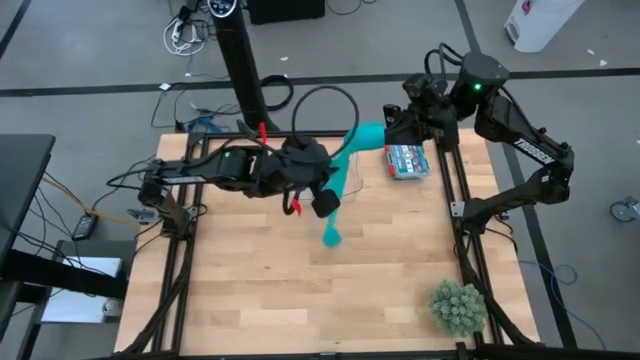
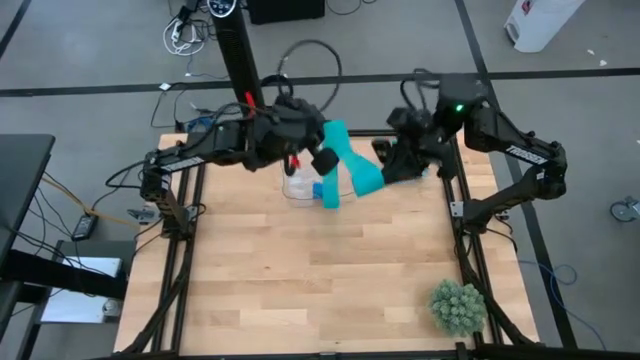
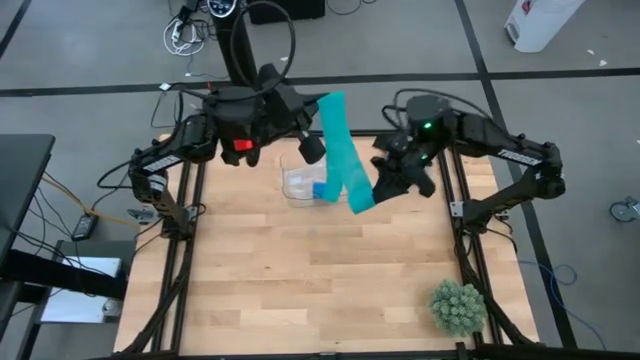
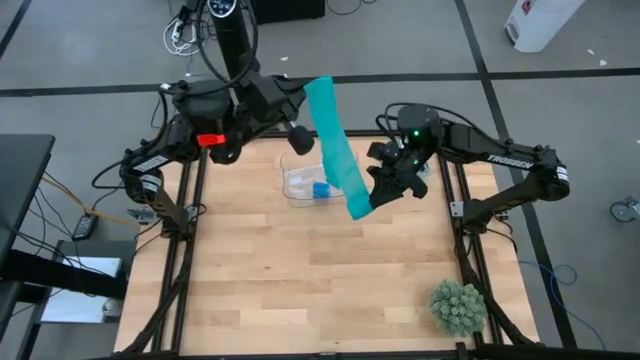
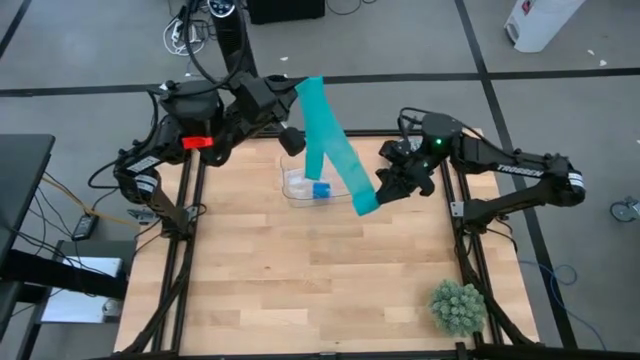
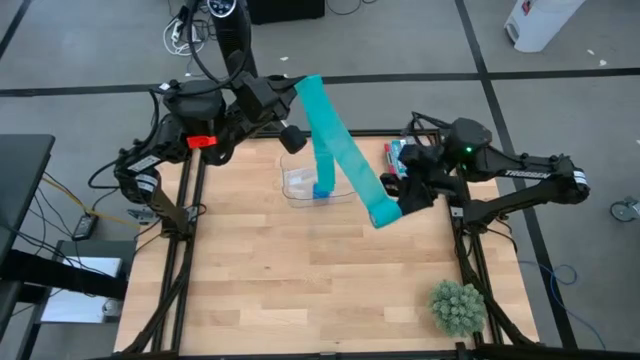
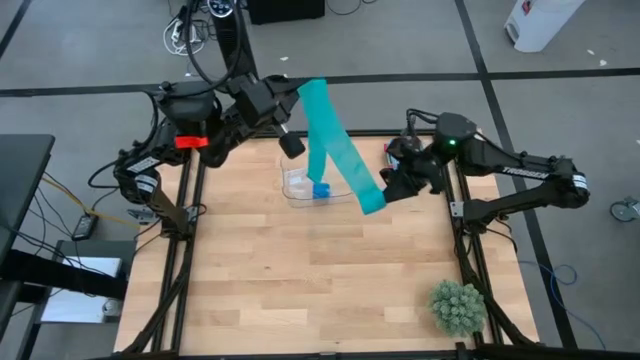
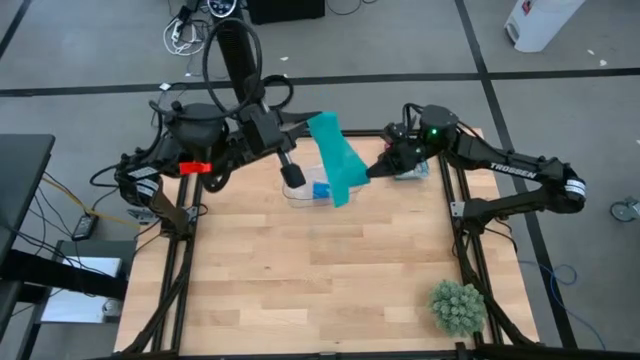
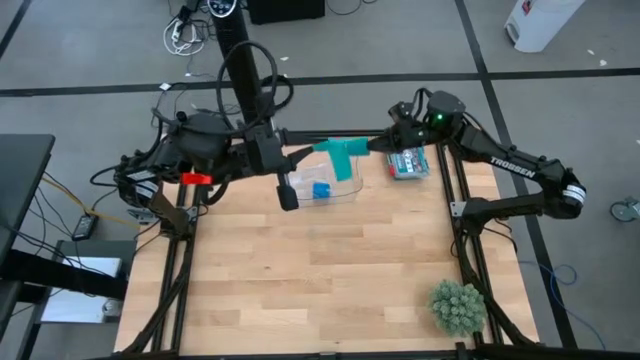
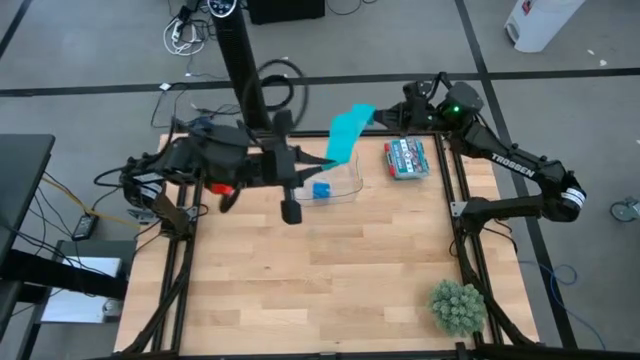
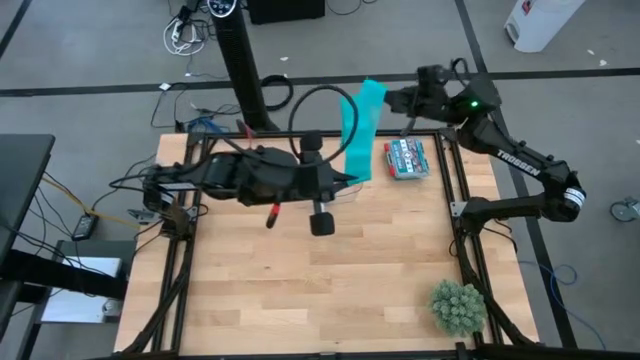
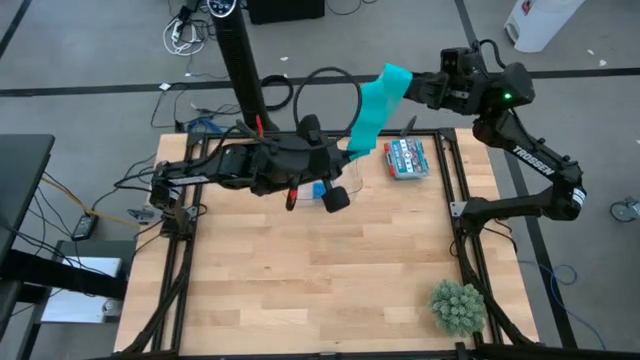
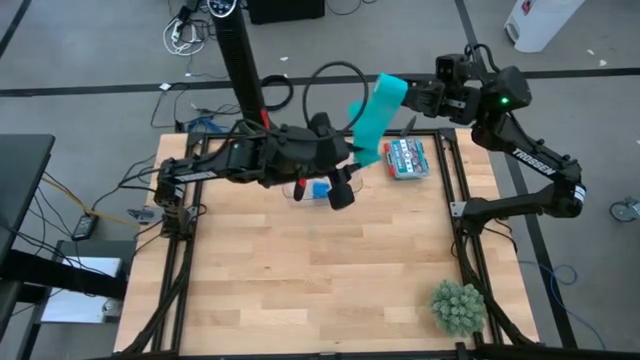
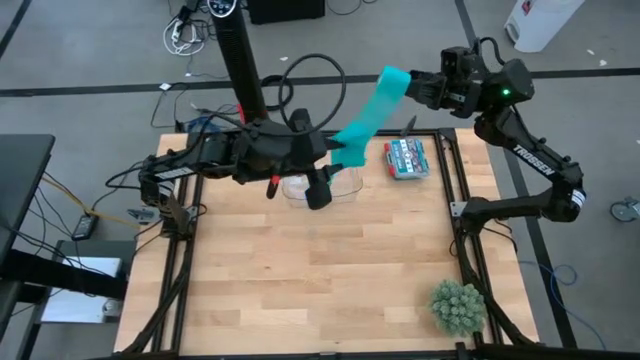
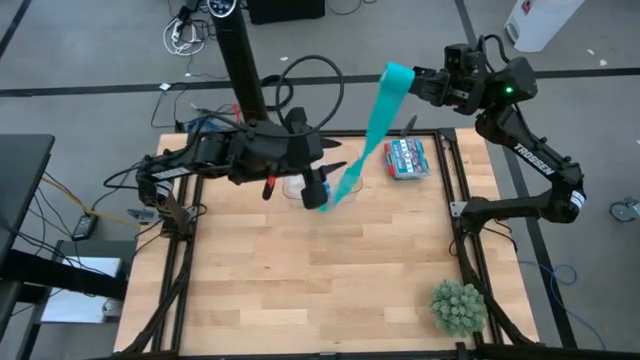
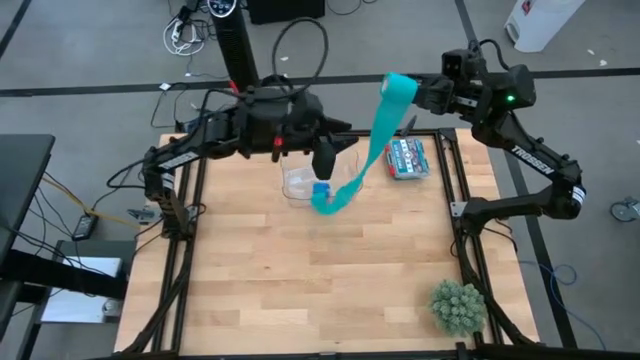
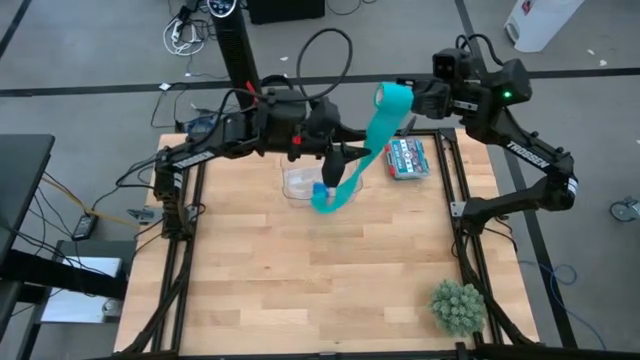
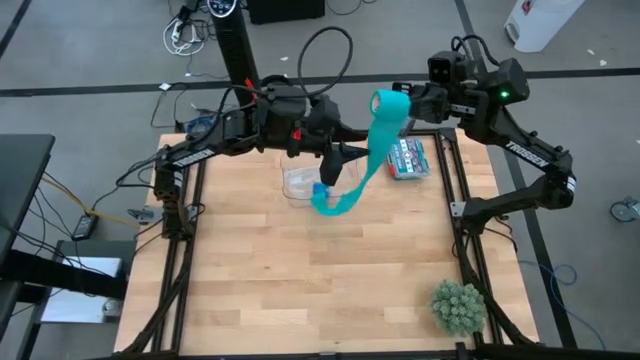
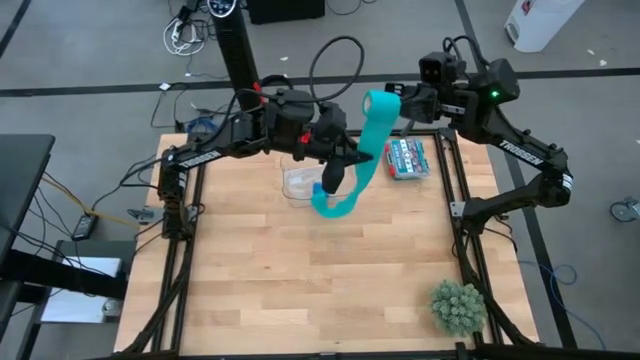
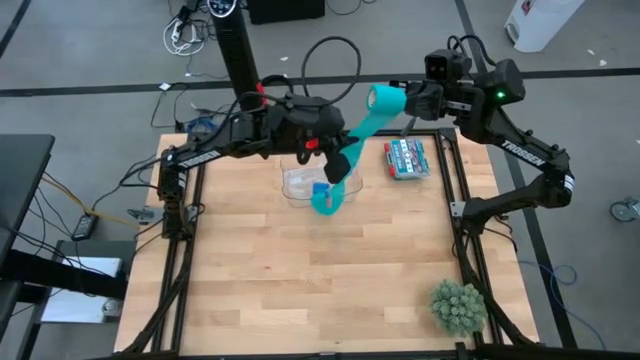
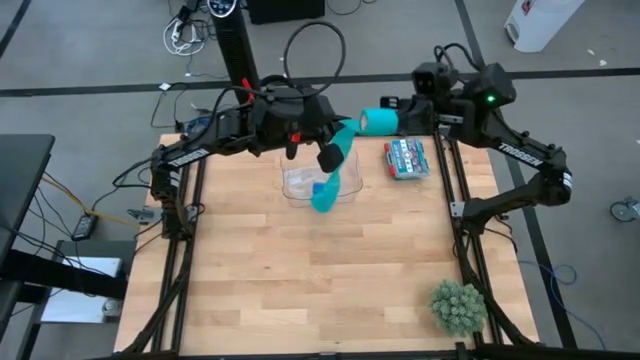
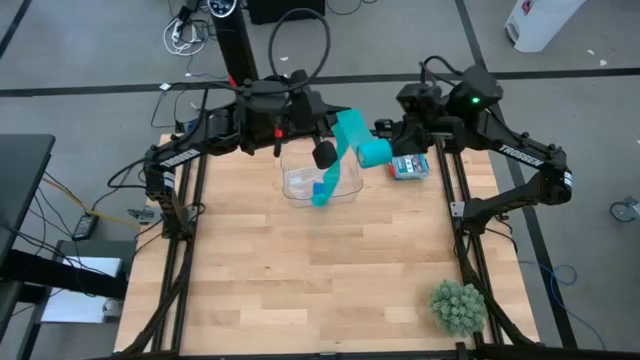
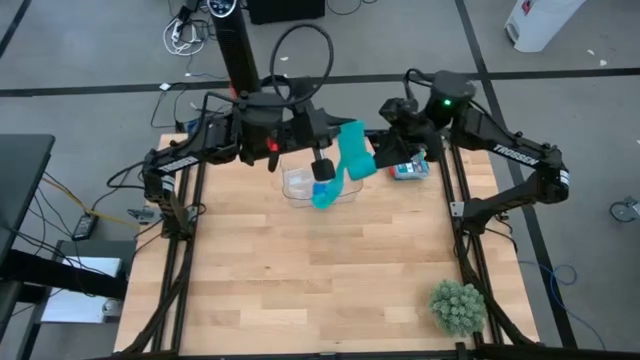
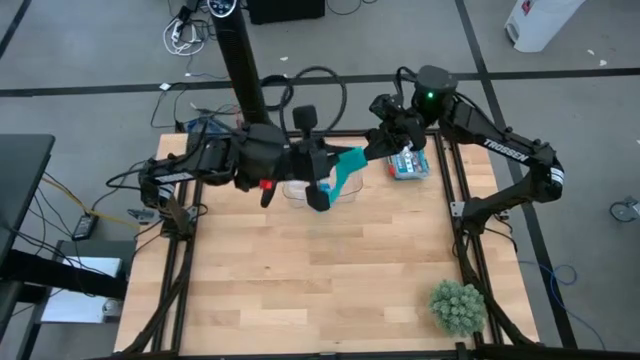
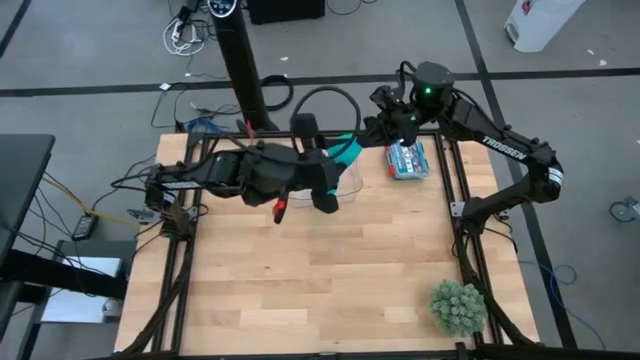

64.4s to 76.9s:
Task: Roll bandage
Roll the sky blue bandage

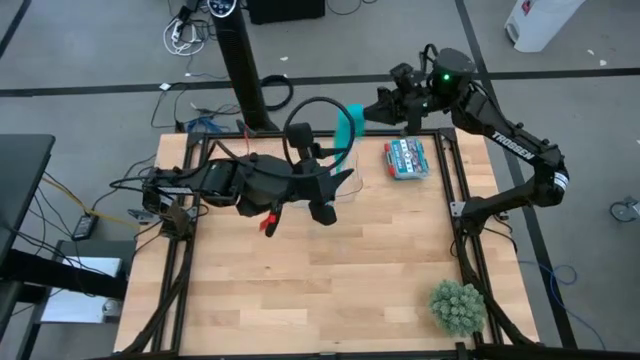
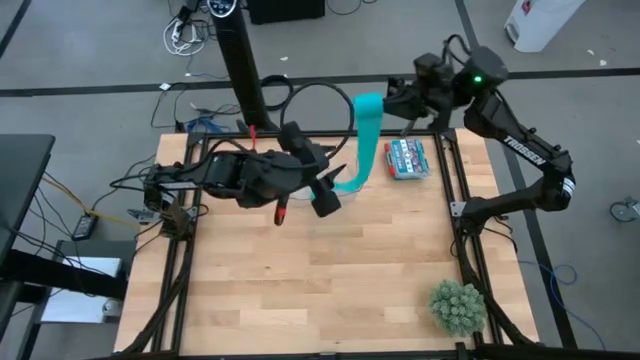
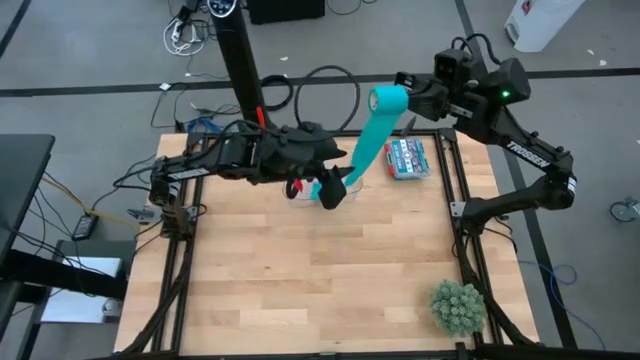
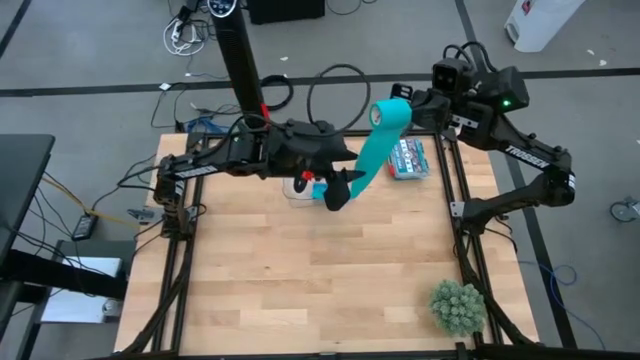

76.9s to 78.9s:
Roll the sky blue bandage

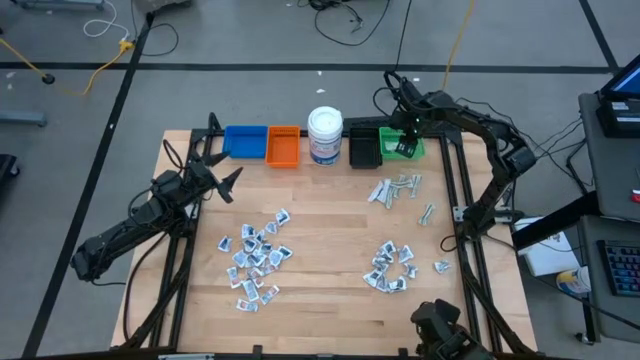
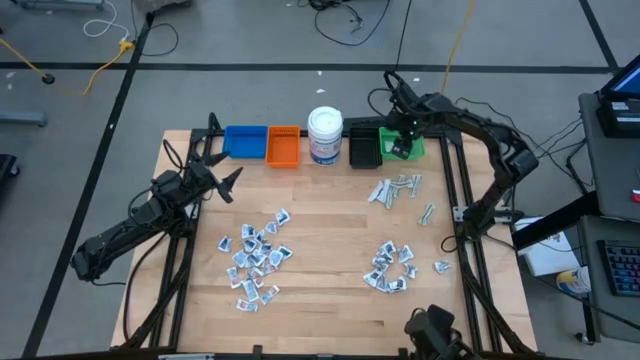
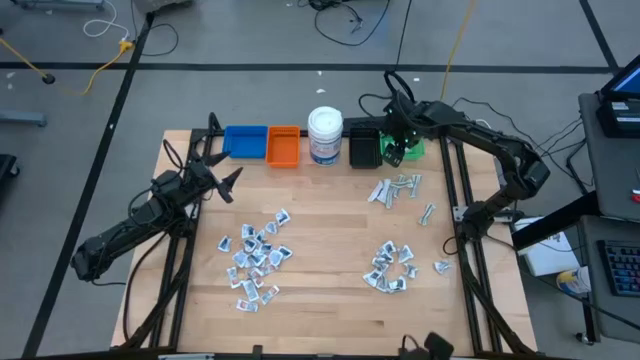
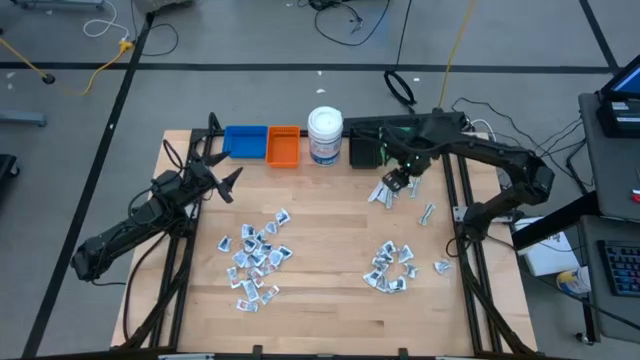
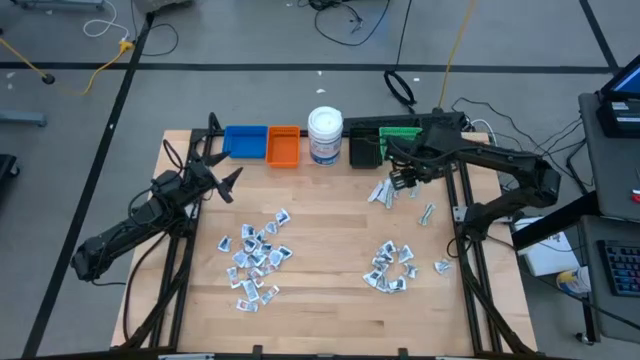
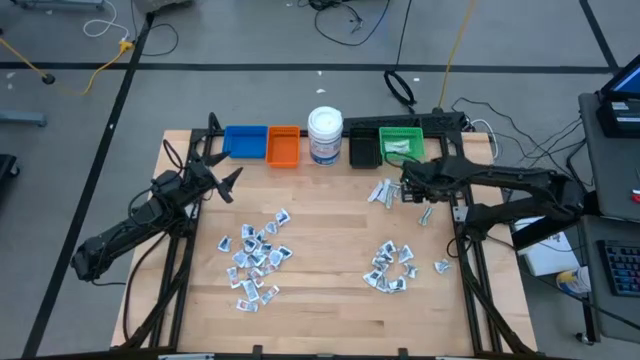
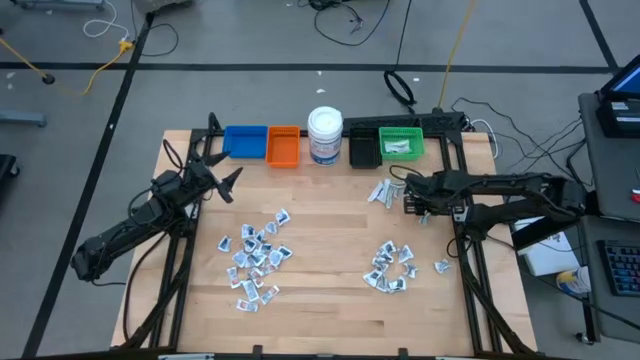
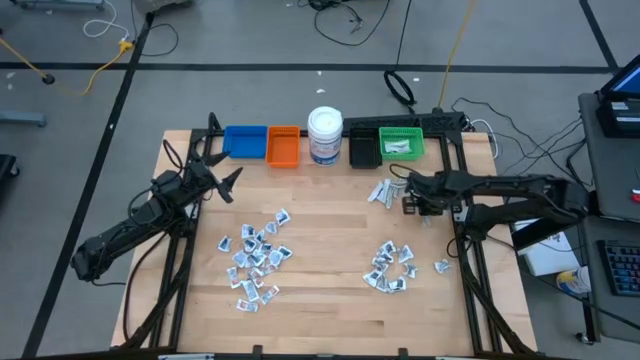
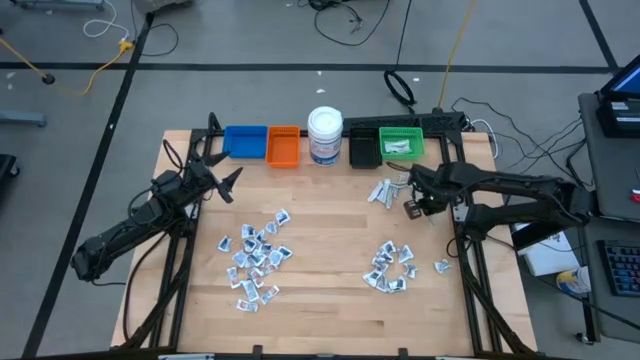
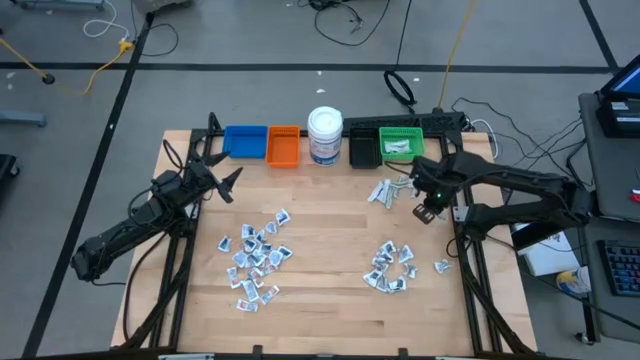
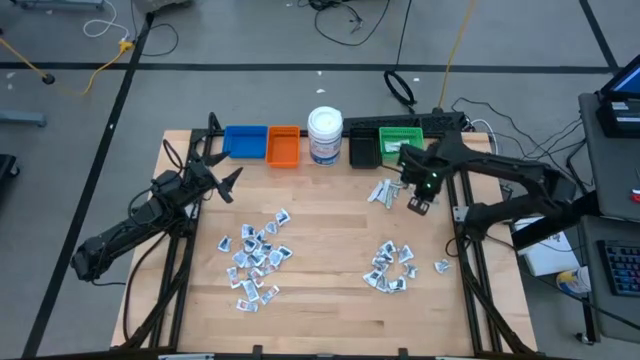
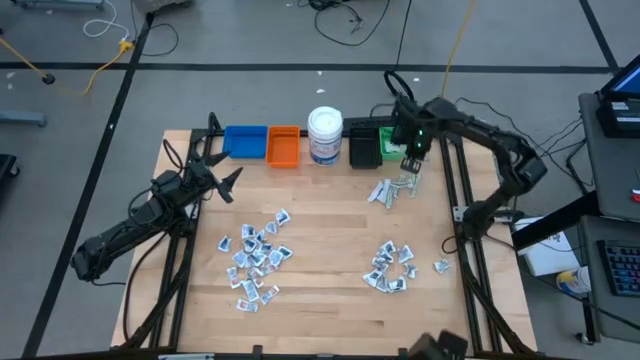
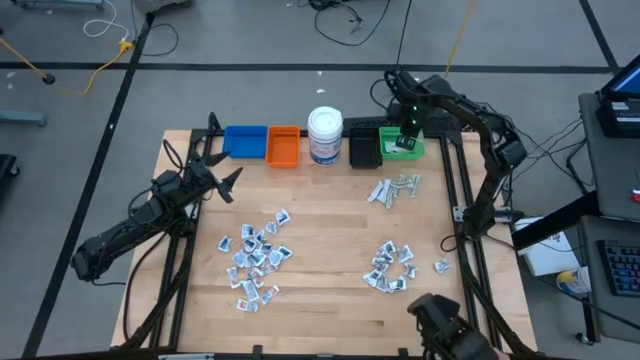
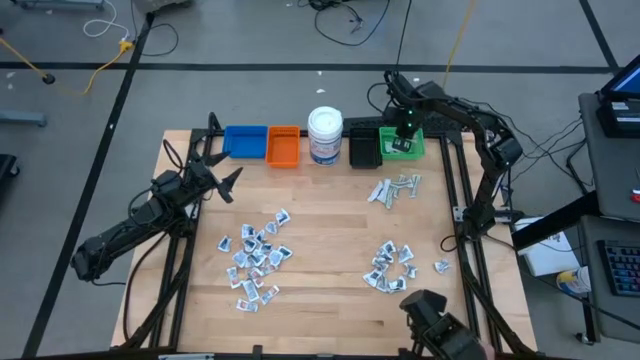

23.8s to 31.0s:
Task: Pick & Place First Aid Supplies
Put the bandage into the green bin
